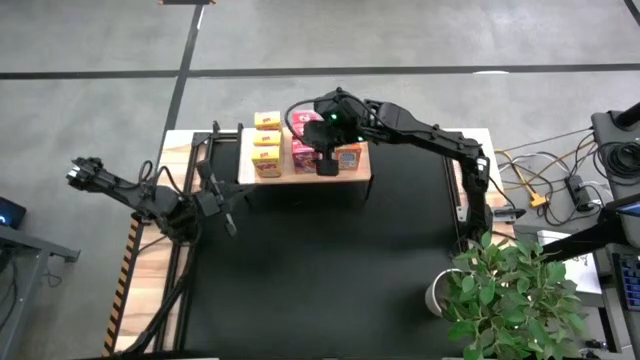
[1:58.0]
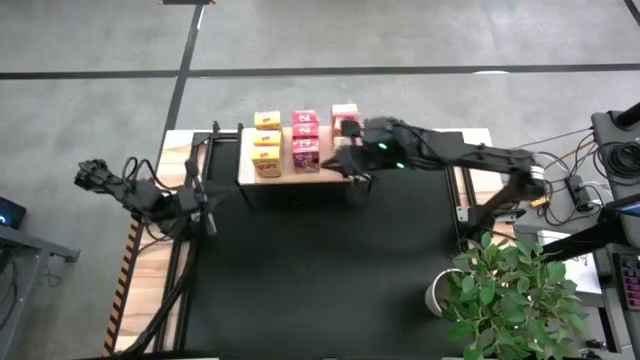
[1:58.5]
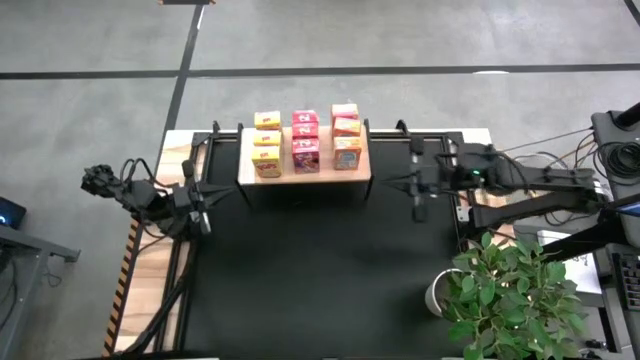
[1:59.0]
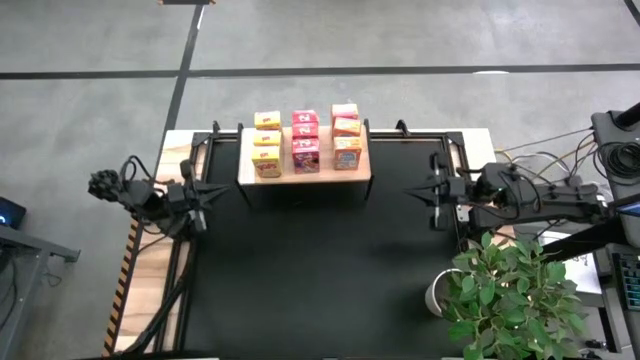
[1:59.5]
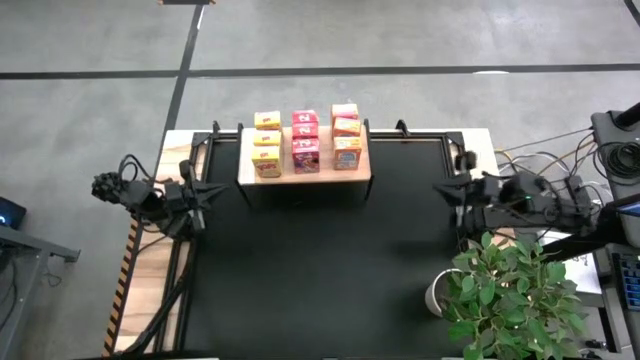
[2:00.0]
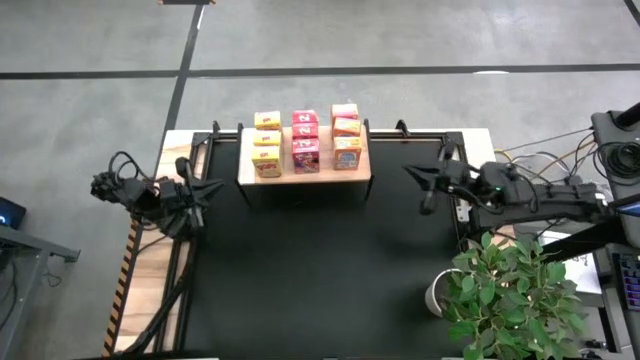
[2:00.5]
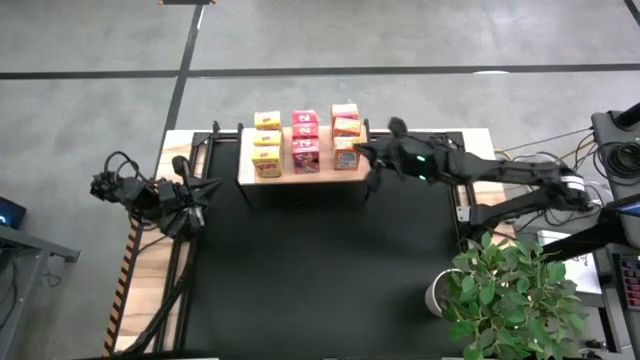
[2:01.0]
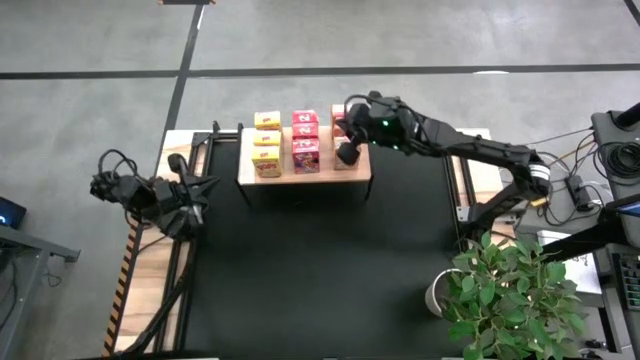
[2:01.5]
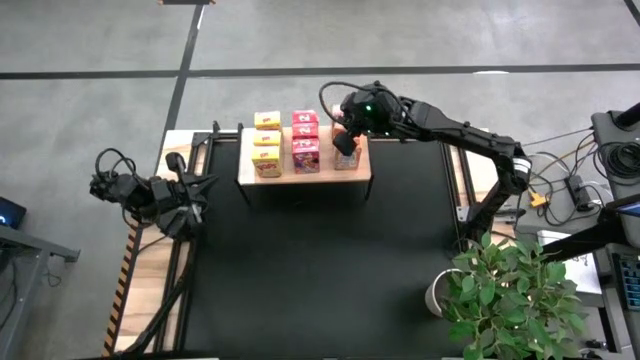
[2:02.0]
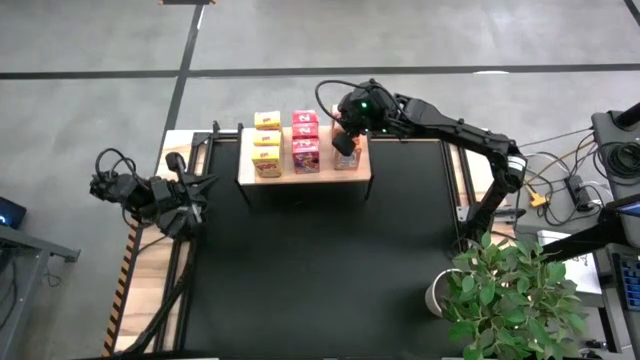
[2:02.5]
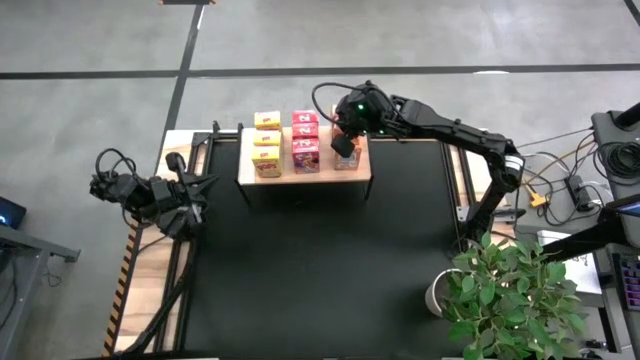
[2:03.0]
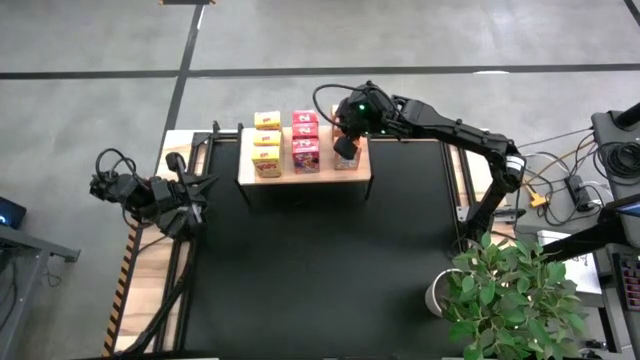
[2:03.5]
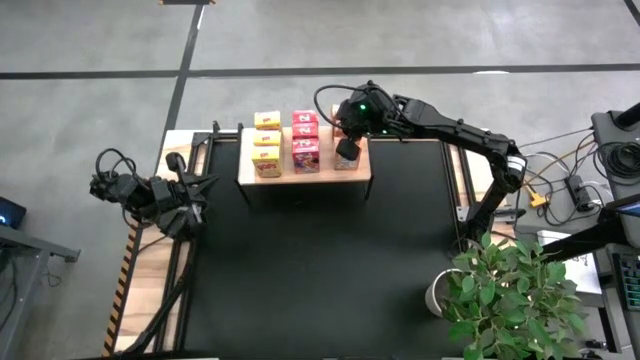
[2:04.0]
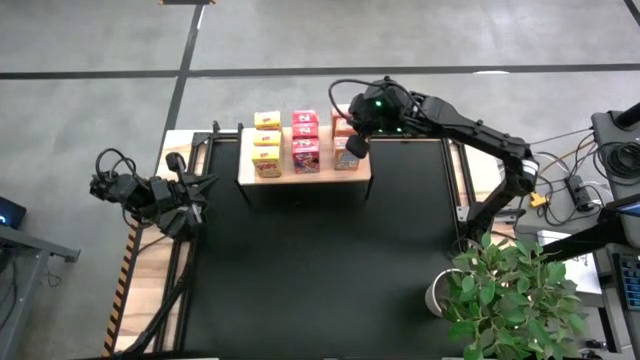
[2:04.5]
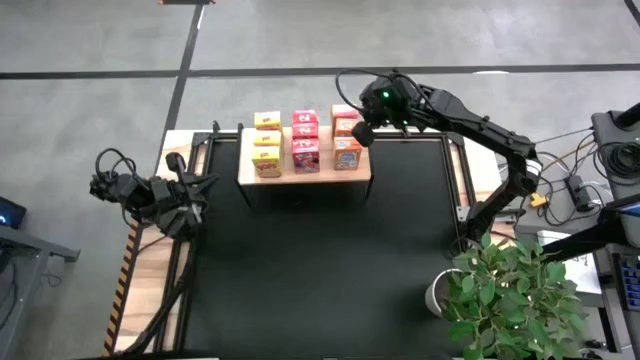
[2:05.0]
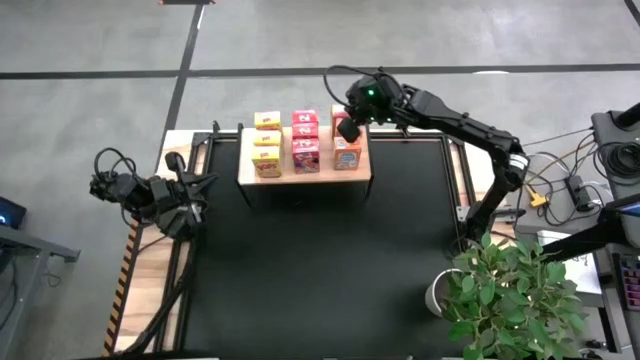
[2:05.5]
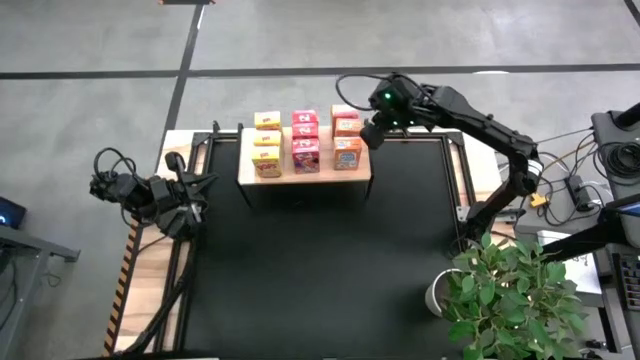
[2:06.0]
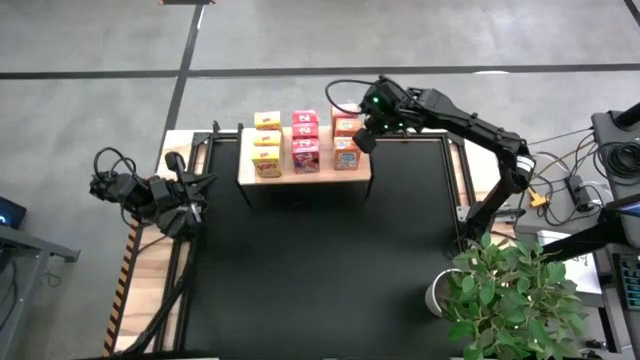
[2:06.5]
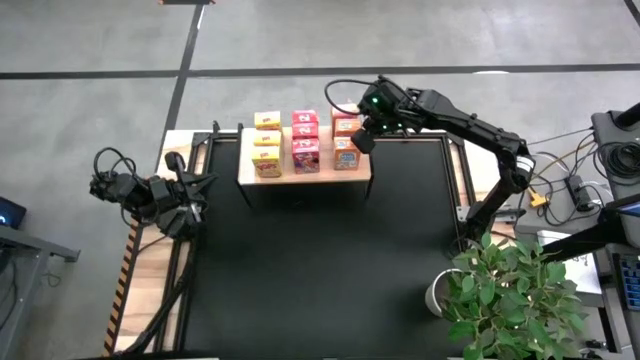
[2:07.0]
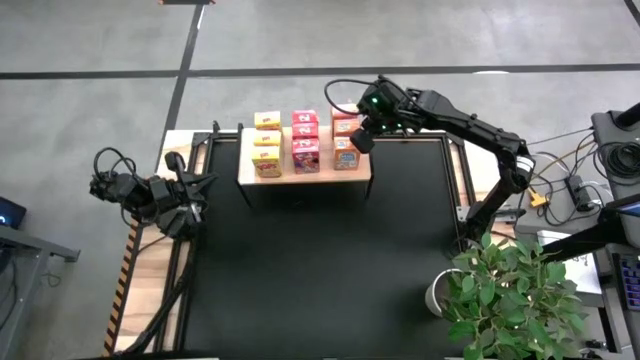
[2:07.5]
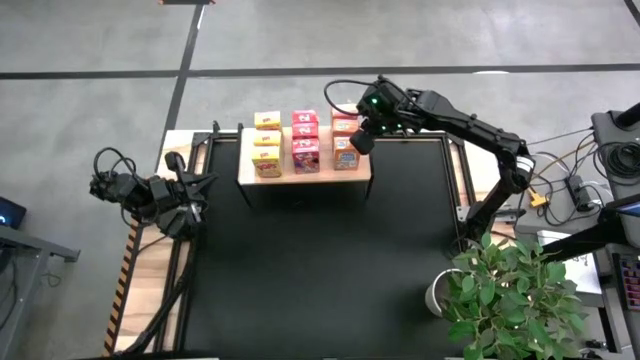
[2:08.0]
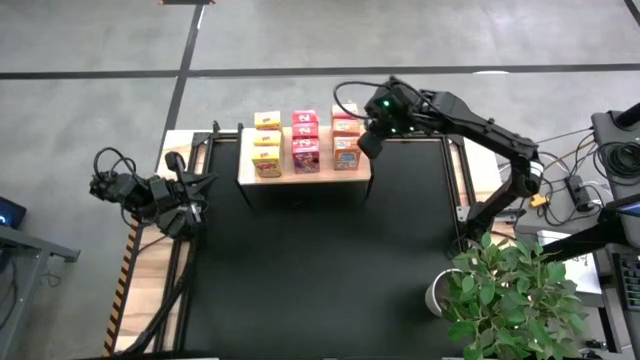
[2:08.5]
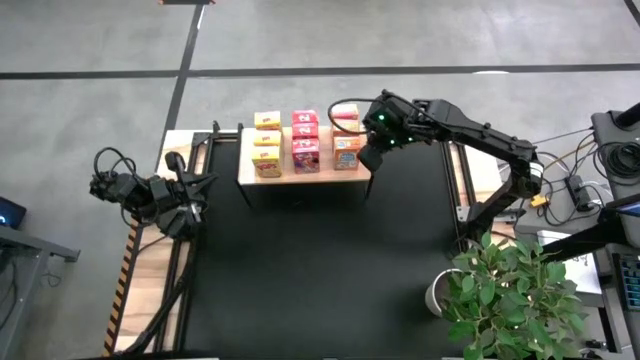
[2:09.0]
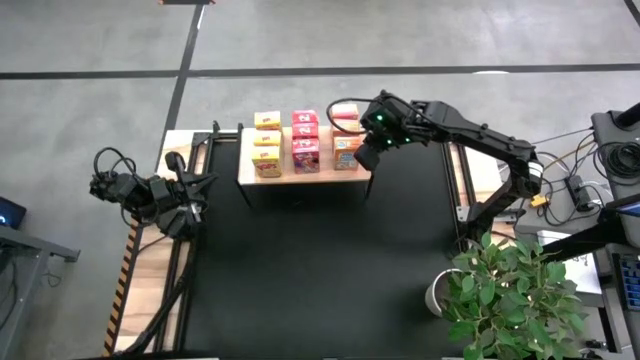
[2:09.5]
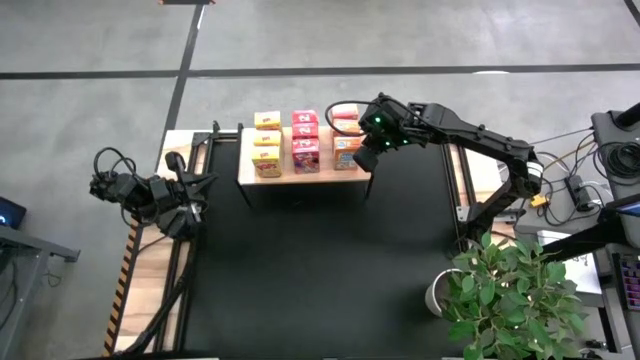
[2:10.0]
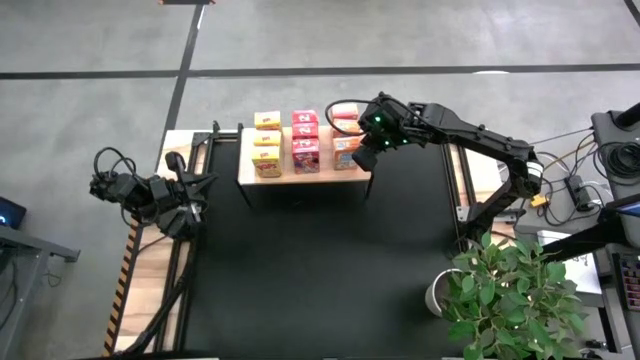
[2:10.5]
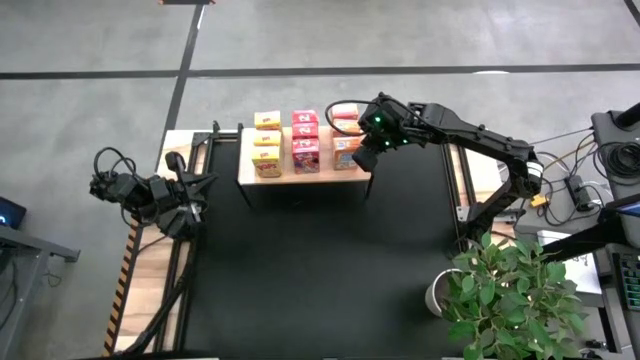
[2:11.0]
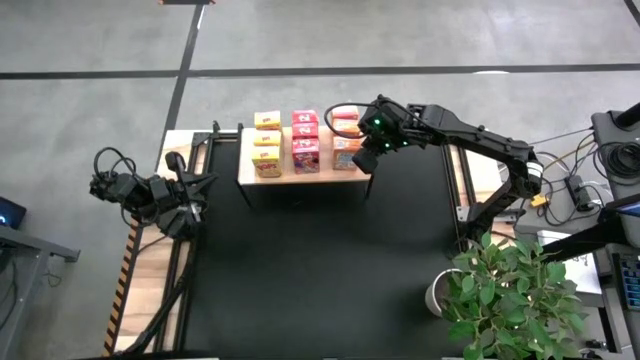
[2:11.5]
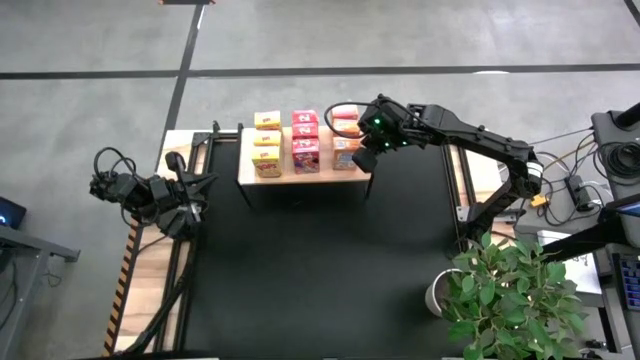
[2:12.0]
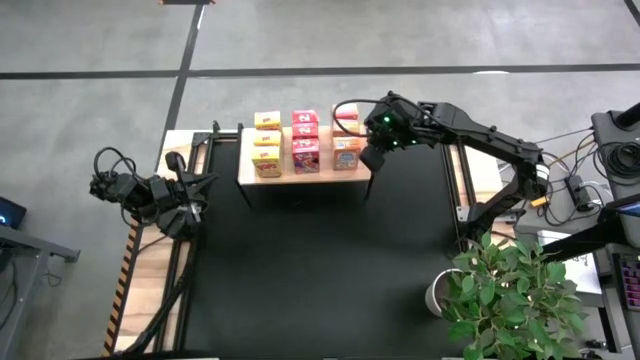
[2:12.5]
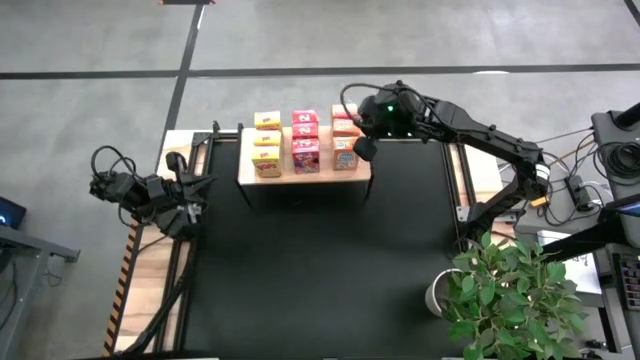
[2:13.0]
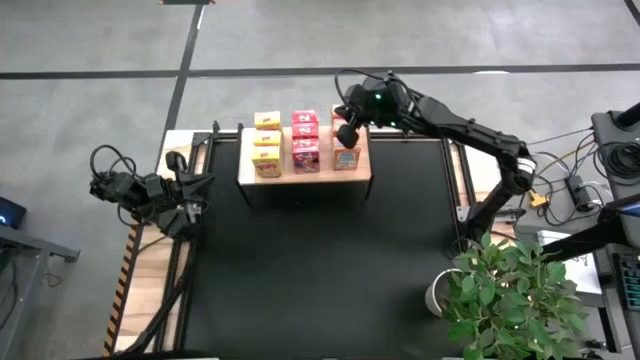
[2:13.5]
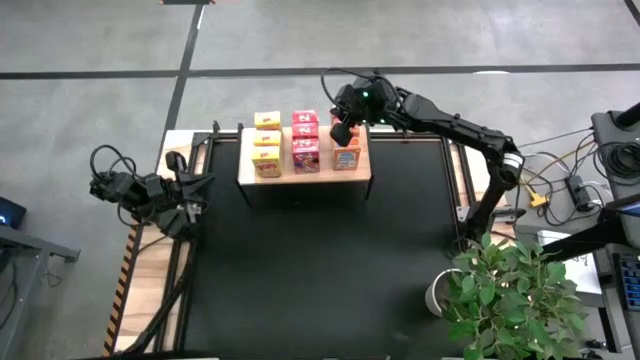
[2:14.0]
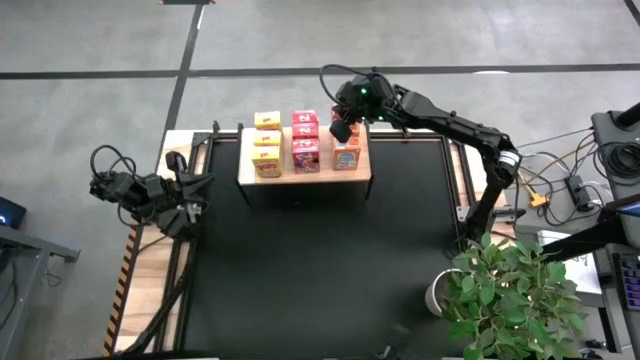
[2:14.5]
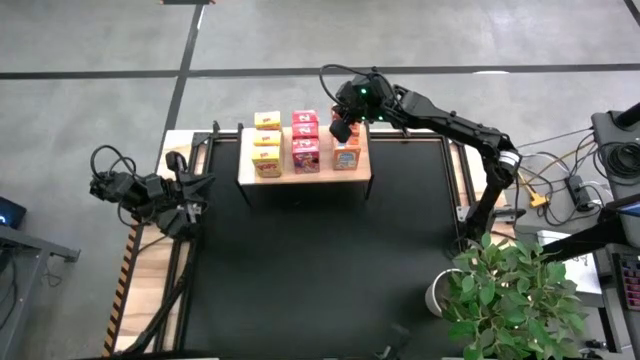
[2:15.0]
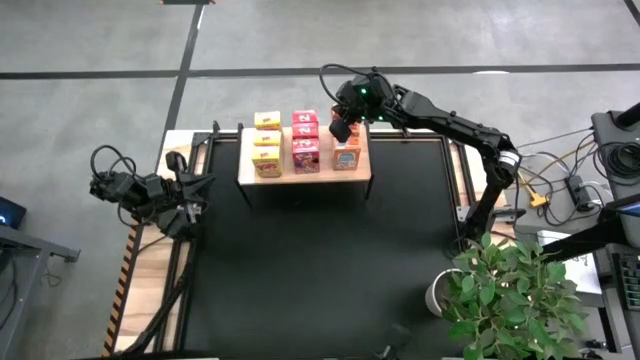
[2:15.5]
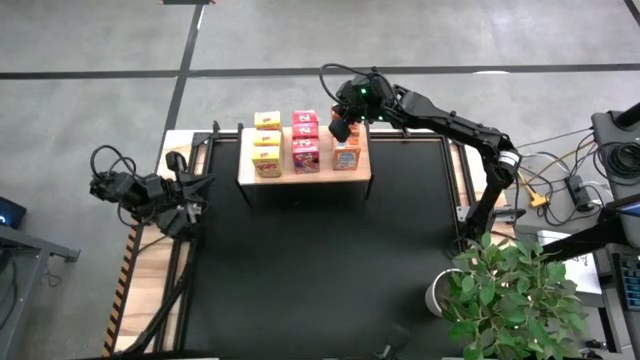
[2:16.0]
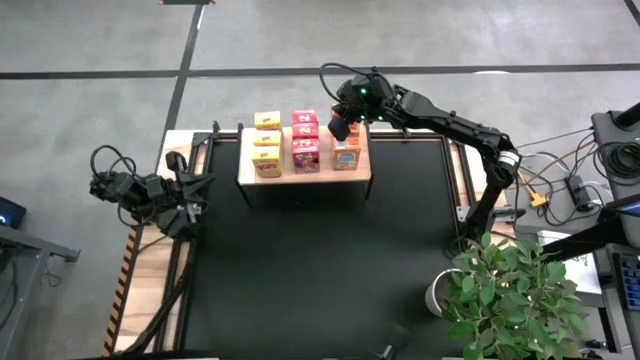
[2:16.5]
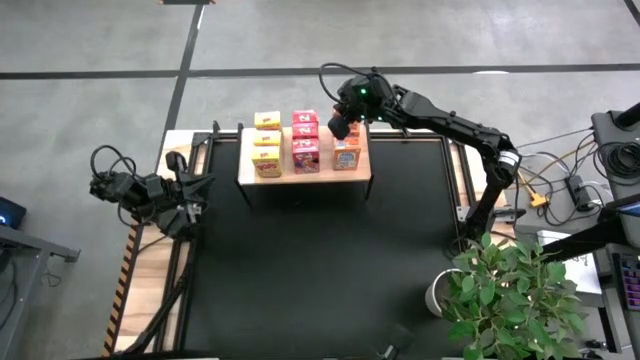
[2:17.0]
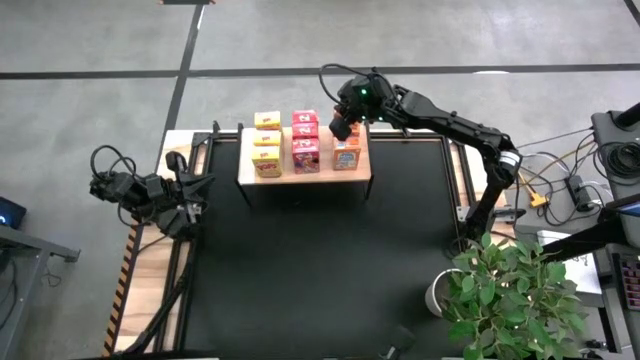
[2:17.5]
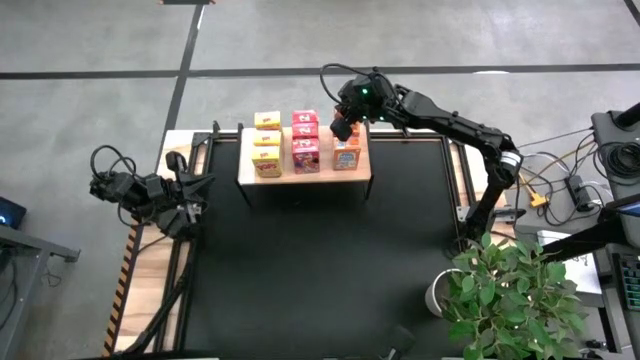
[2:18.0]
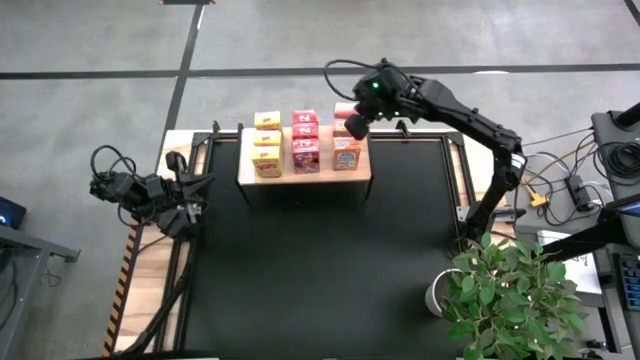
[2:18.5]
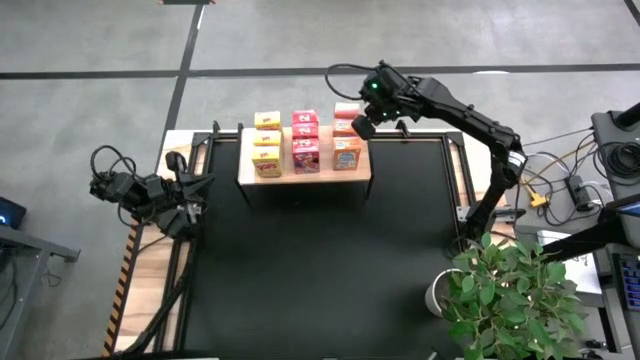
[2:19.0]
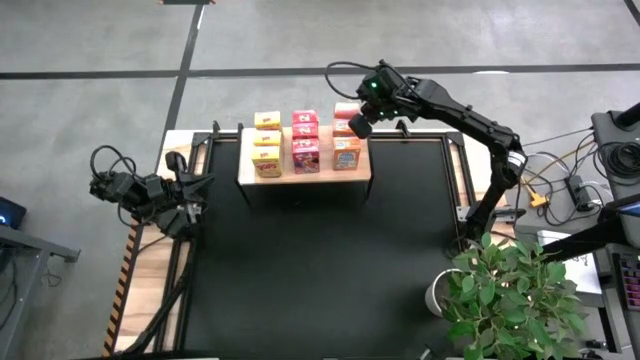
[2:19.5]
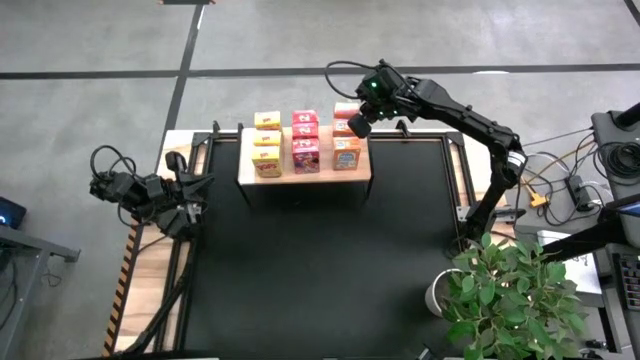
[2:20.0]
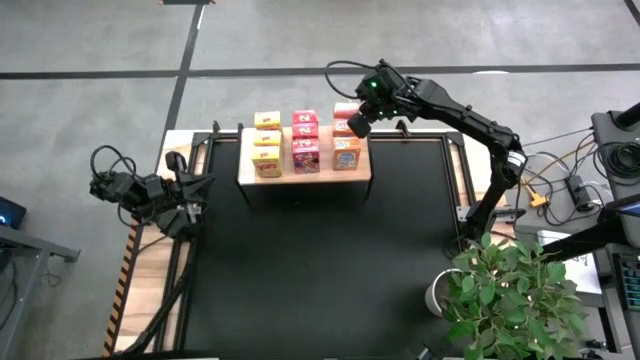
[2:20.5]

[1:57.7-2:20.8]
Task: Stack cereal on shelf
Adjust the orange cereal boxes on the shelf
